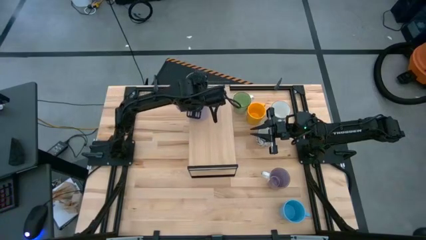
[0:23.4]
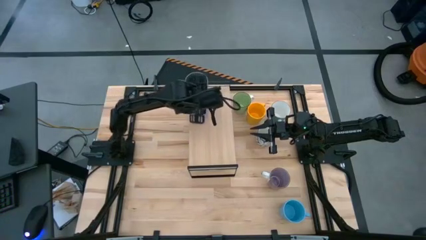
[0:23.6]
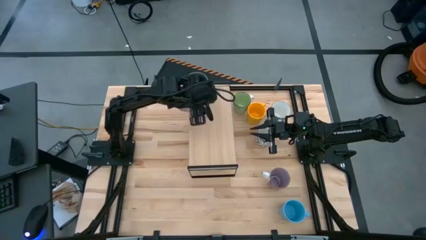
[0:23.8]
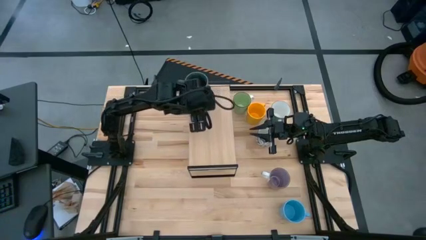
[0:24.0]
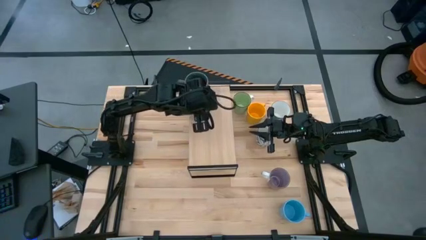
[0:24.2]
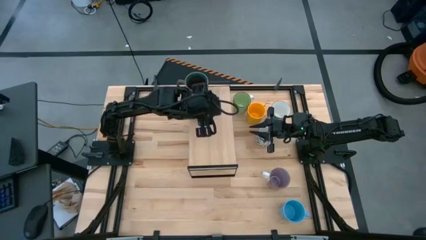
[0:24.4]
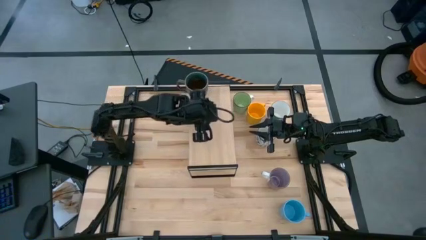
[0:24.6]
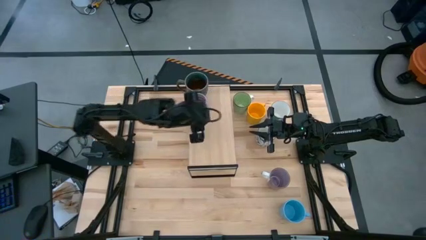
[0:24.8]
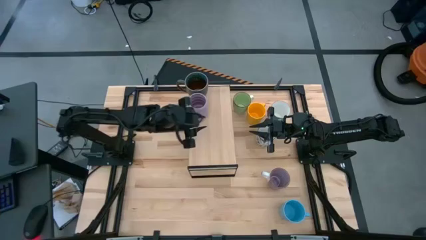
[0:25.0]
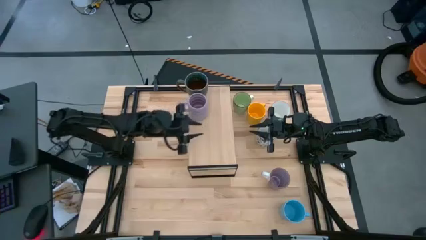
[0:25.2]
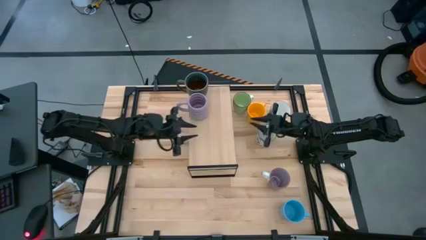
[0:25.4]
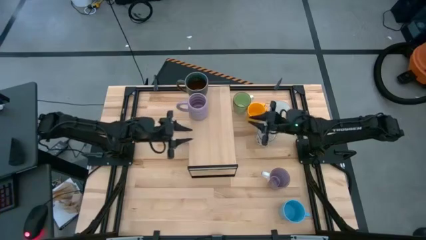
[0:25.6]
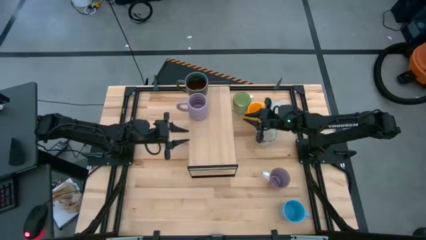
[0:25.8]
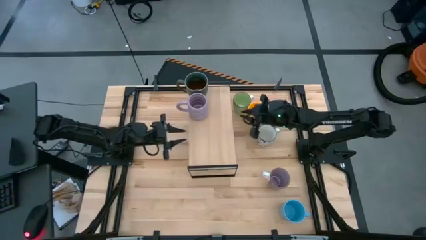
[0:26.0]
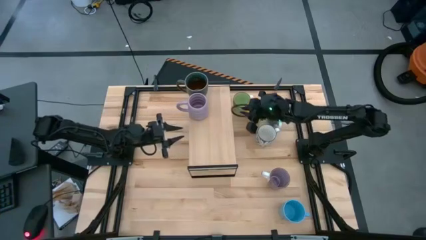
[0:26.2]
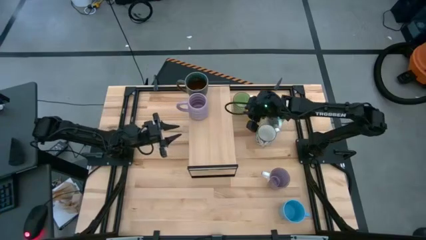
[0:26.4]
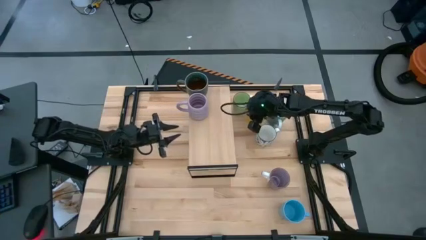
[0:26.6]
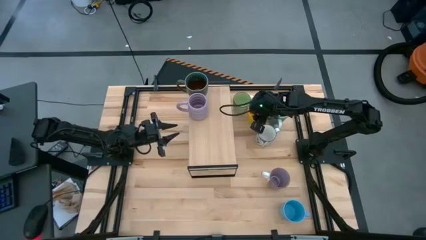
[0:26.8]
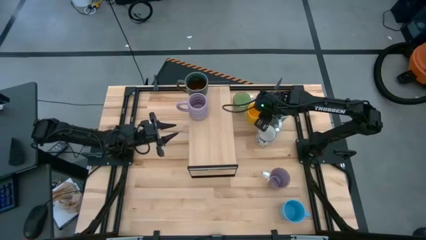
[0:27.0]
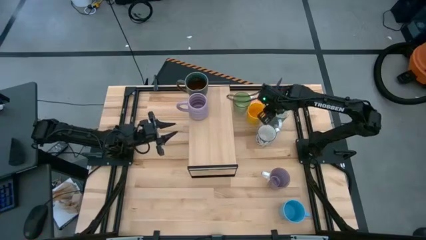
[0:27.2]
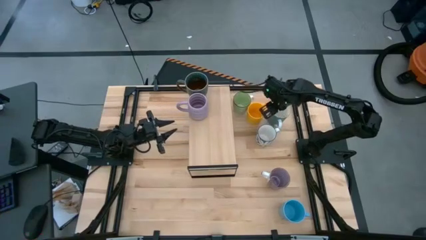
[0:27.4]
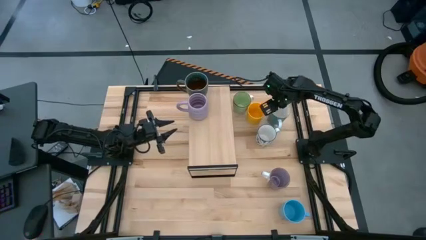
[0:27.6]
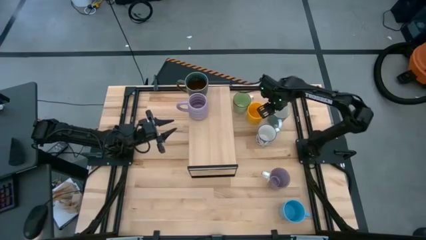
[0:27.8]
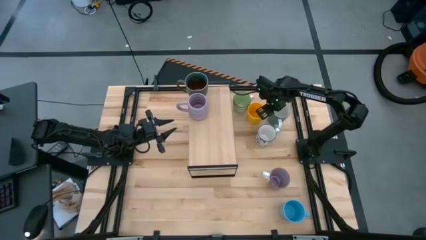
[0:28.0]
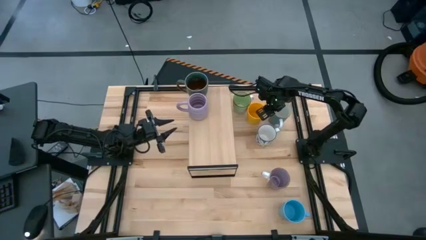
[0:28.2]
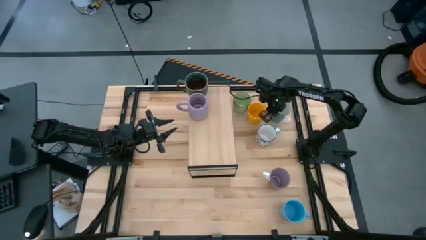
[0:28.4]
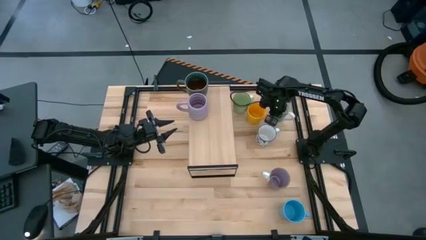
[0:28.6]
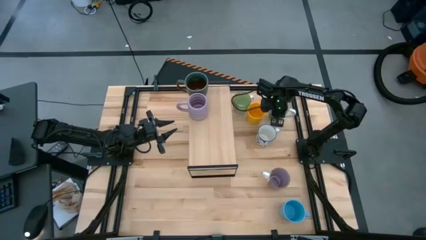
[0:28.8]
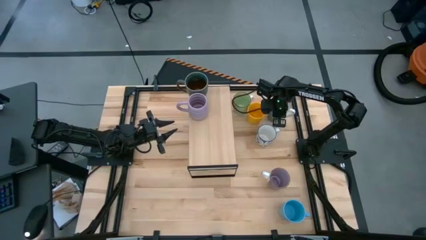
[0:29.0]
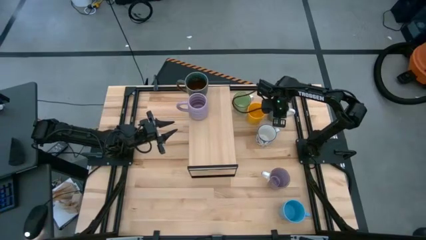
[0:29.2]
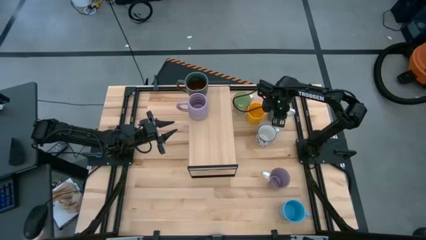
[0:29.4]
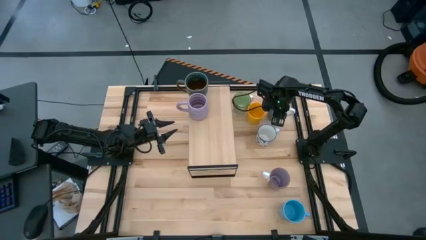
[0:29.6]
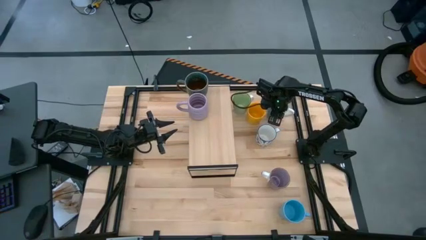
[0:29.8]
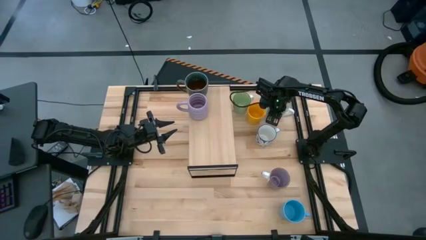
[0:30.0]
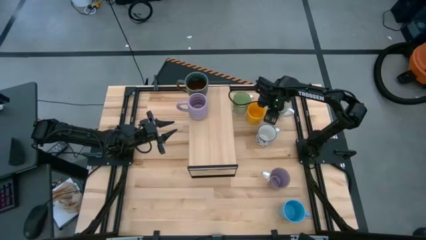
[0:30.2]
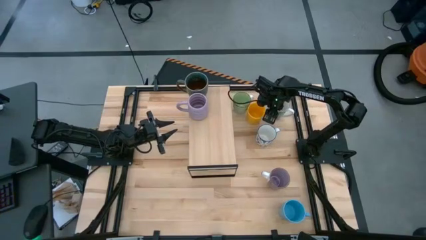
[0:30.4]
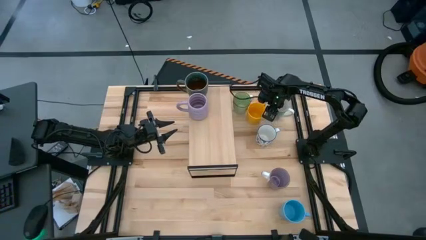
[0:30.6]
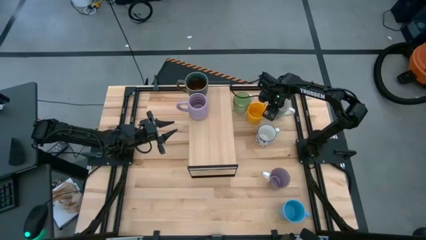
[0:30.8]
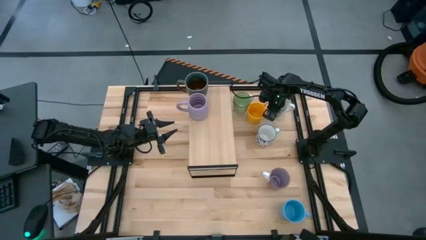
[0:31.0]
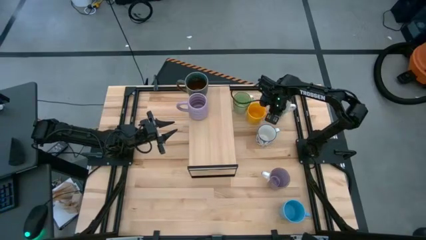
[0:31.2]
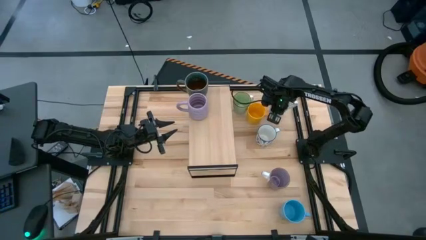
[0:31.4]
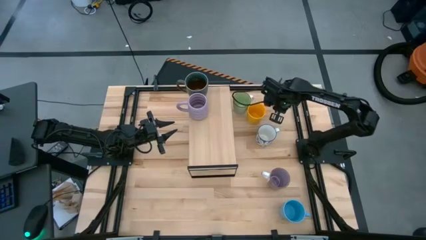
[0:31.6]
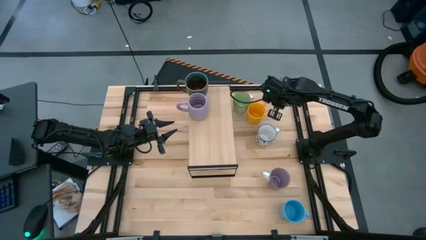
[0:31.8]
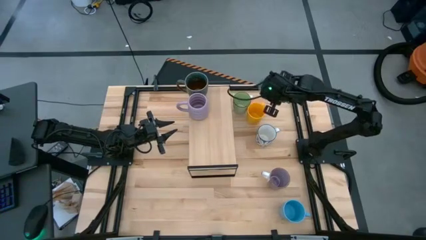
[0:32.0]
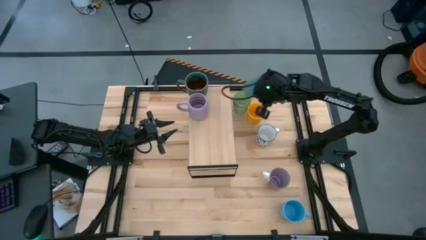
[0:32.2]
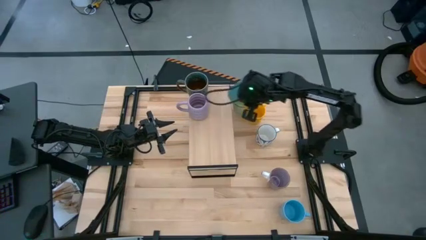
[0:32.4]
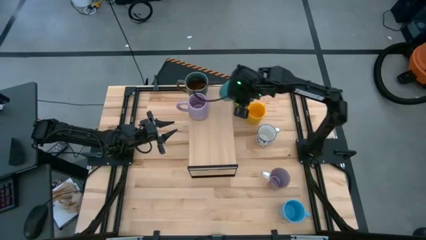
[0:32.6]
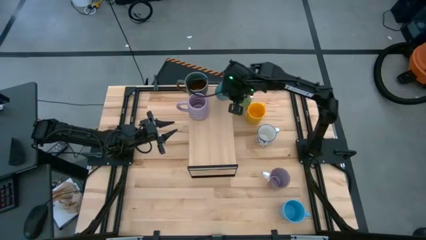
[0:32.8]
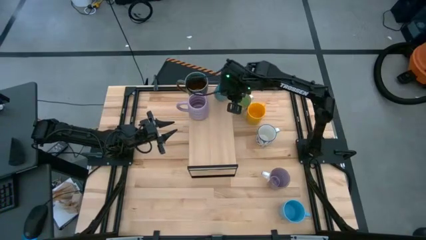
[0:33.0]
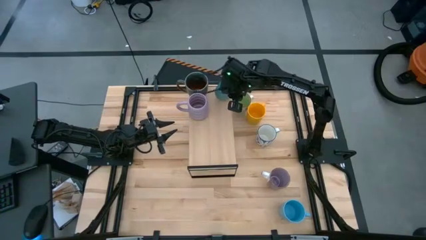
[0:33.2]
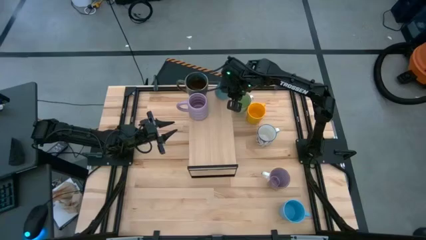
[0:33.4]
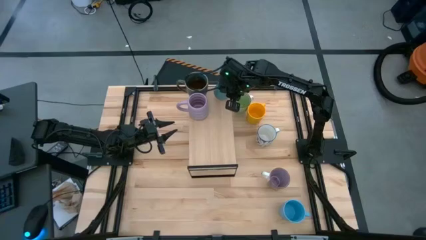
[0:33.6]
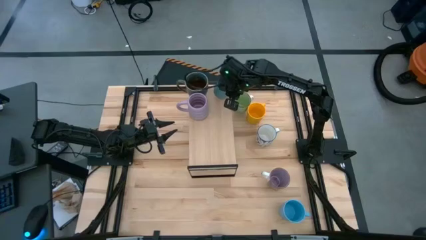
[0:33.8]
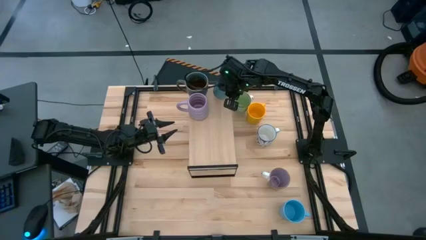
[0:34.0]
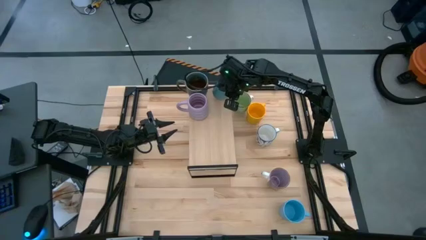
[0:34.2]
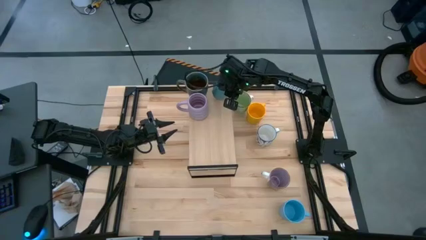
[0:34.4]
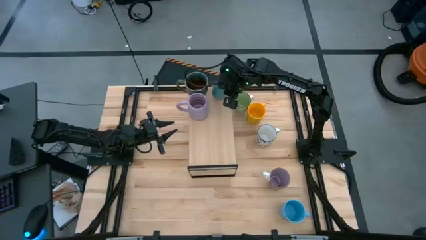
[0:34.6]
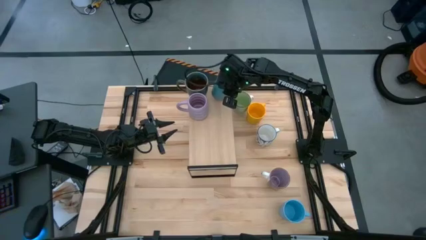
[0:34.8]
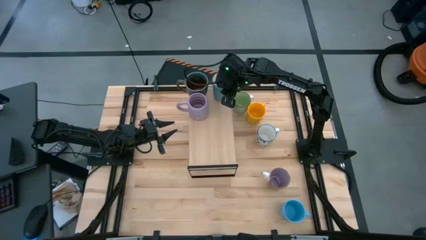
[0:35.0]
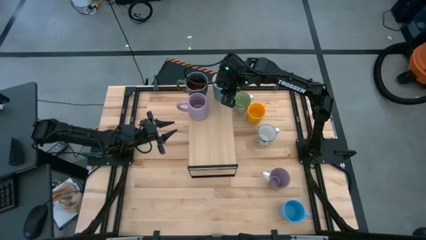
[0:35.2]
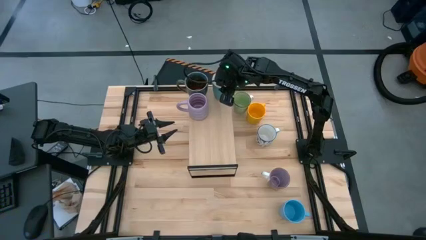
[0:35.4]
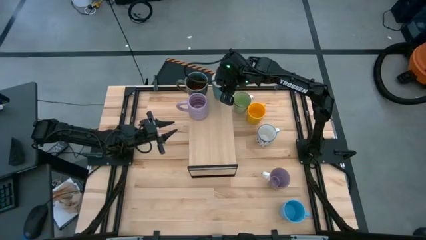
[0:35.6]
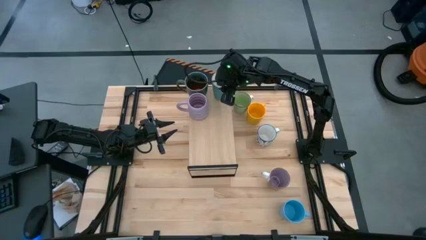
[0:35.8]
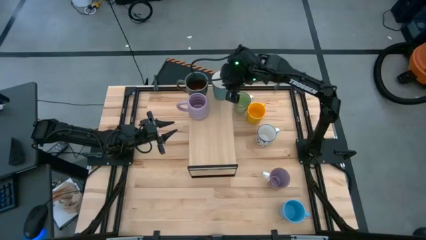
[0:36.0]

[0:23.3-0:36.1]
Task: Place coffee mugs
Put the light blue mug on the shelf
